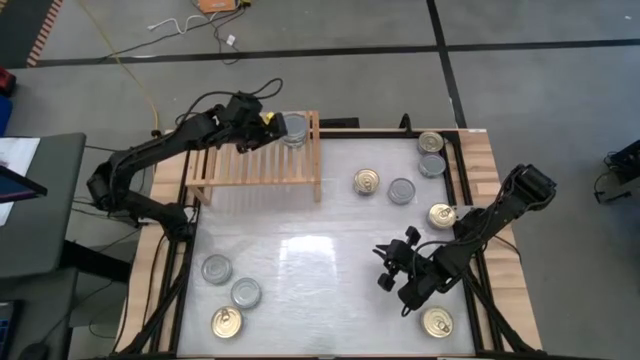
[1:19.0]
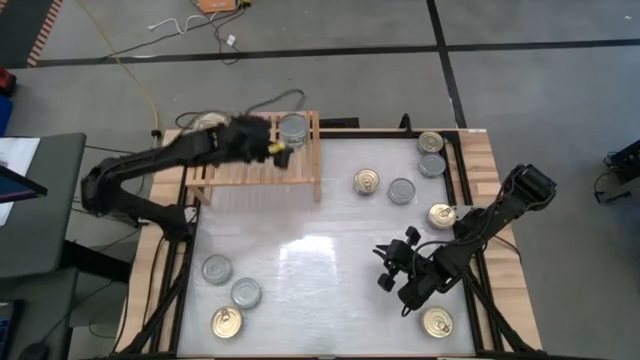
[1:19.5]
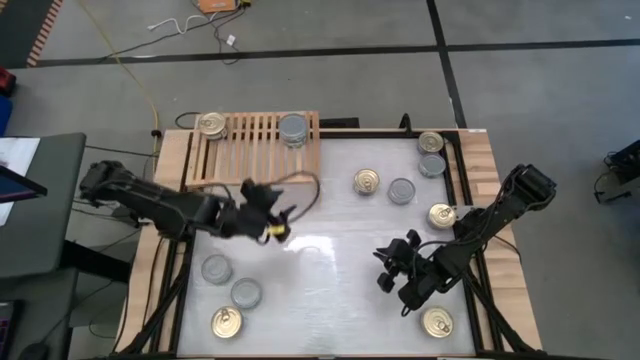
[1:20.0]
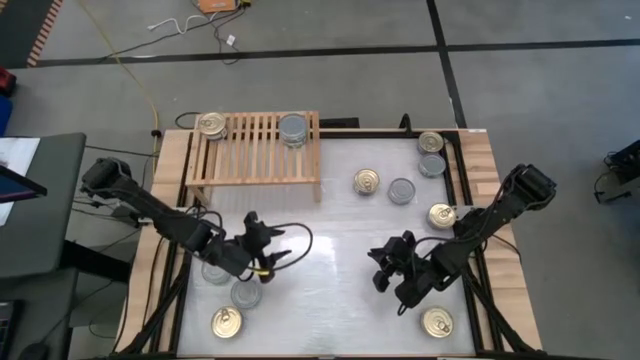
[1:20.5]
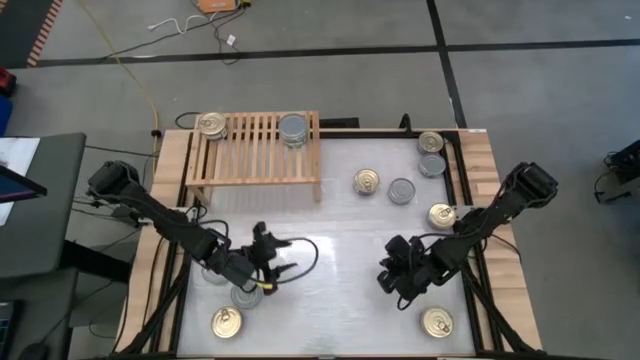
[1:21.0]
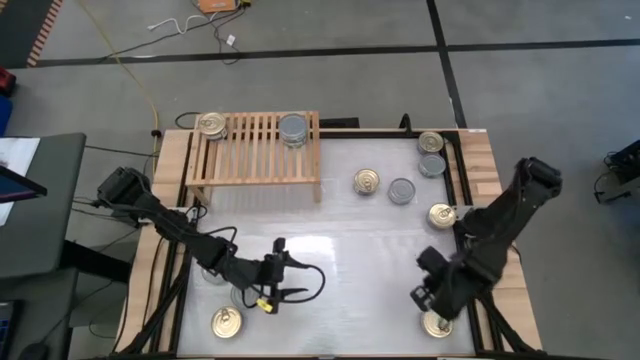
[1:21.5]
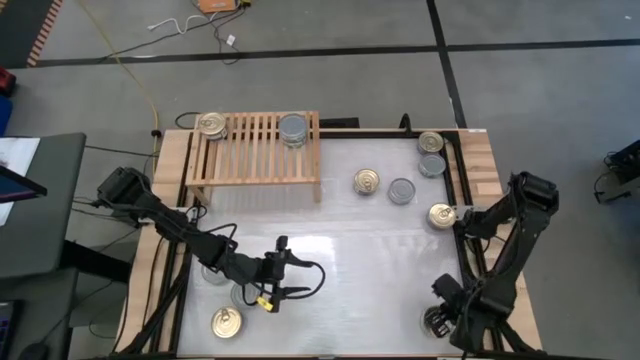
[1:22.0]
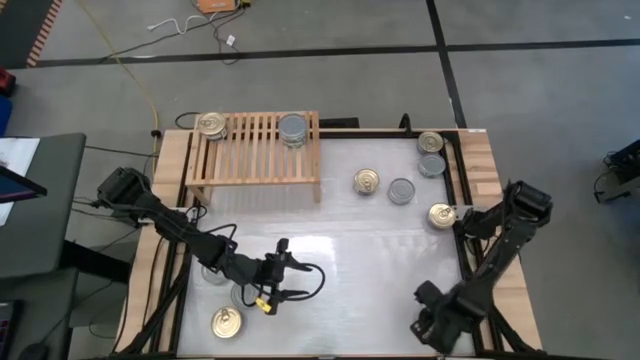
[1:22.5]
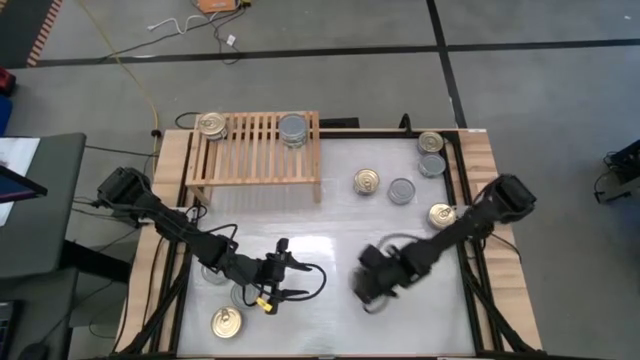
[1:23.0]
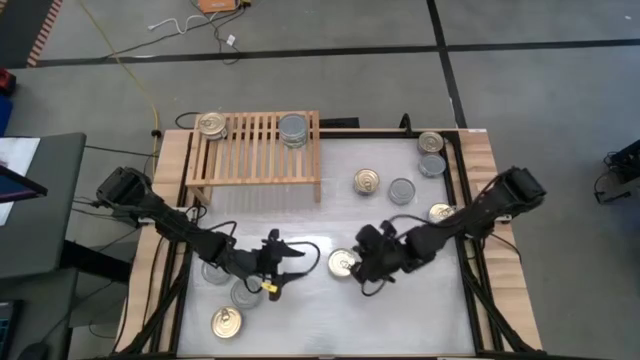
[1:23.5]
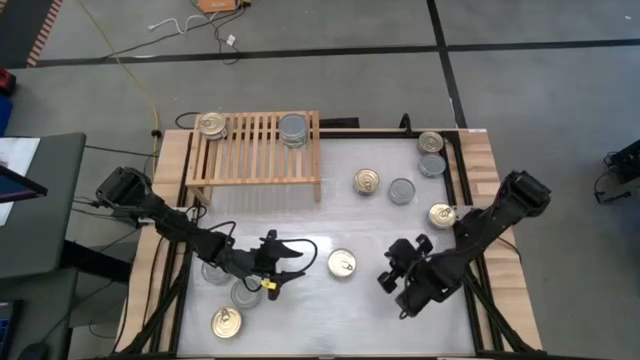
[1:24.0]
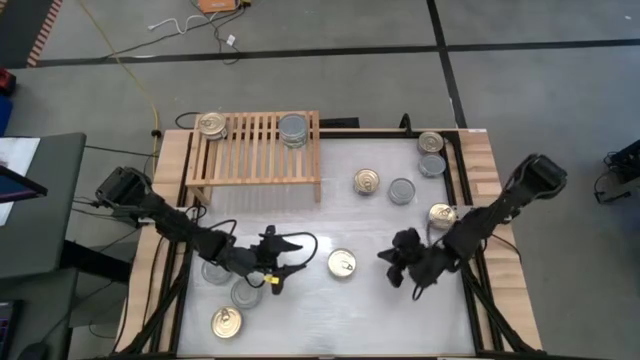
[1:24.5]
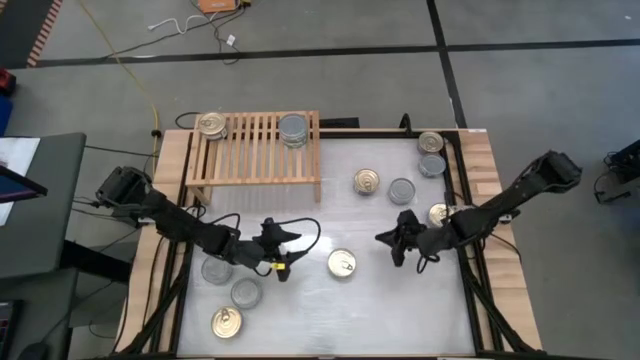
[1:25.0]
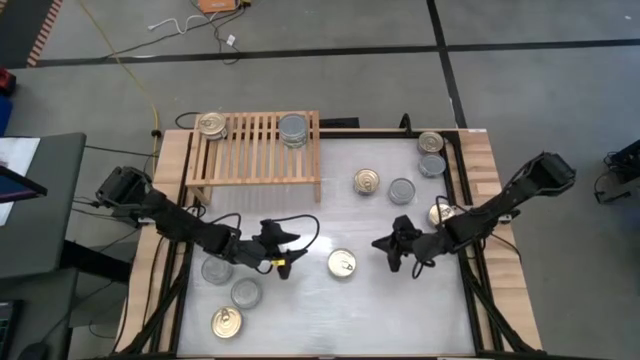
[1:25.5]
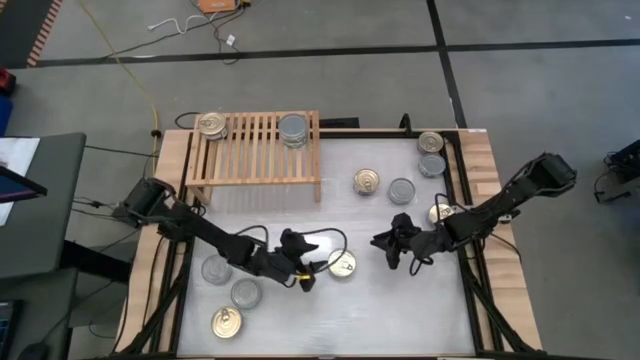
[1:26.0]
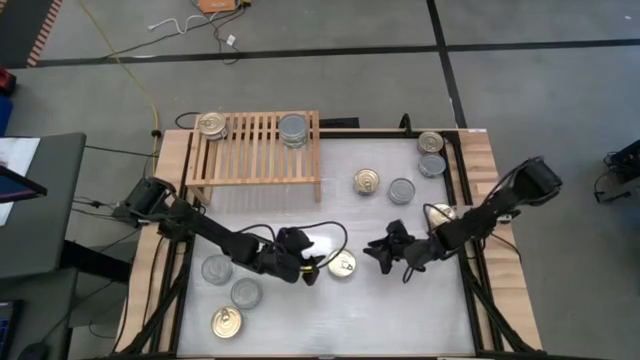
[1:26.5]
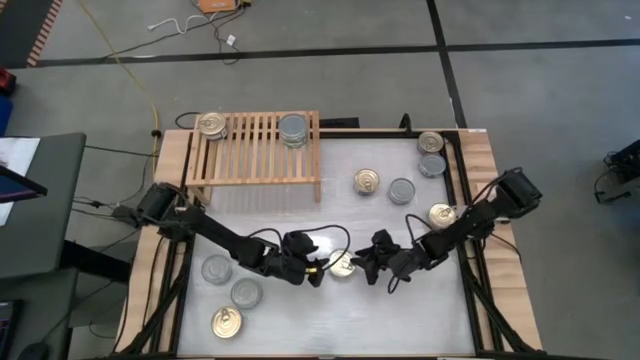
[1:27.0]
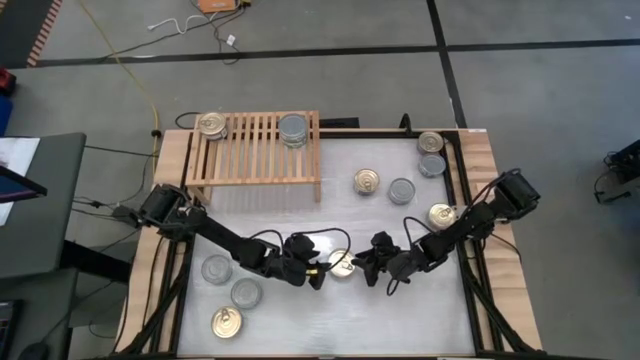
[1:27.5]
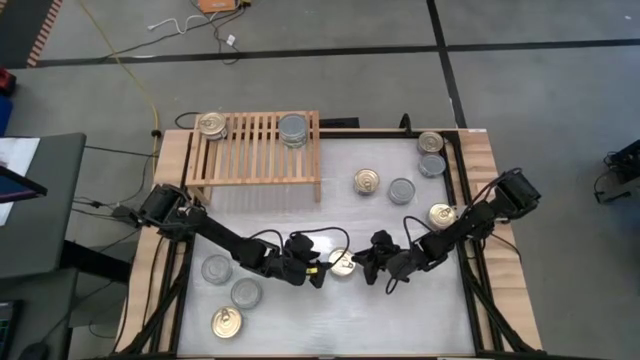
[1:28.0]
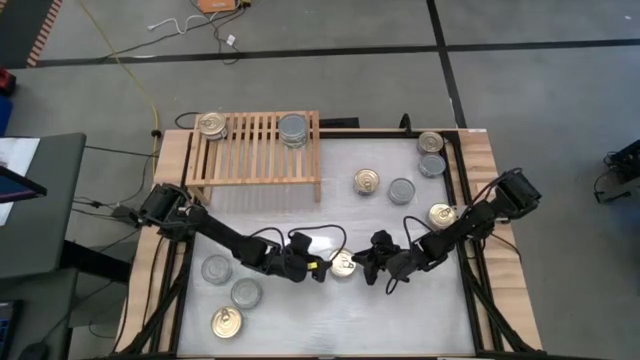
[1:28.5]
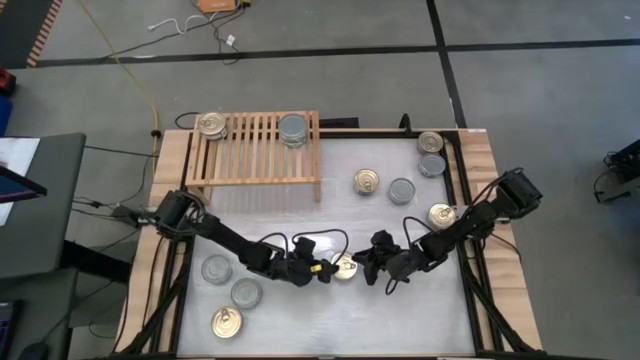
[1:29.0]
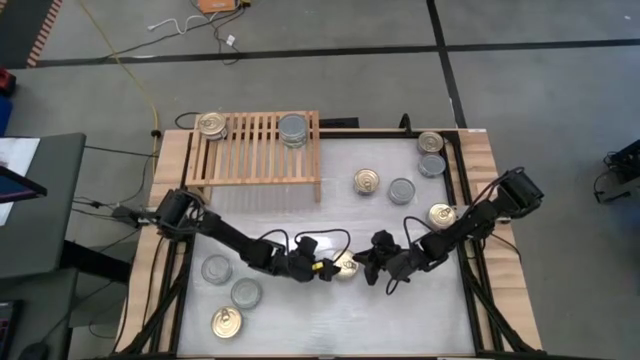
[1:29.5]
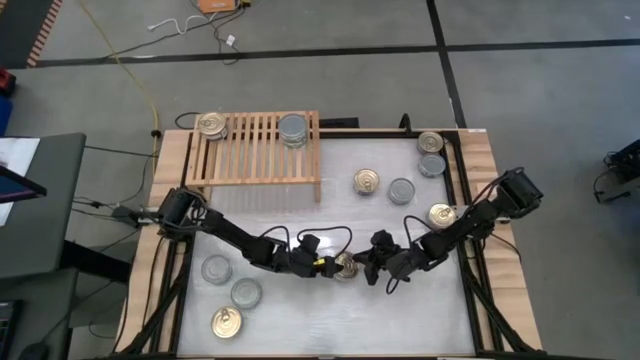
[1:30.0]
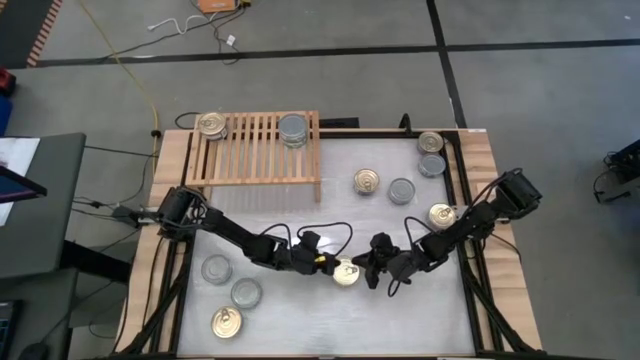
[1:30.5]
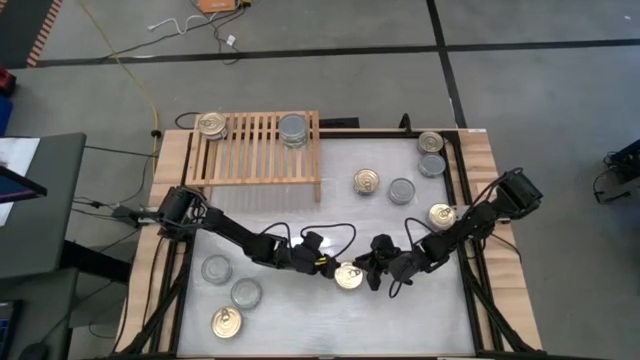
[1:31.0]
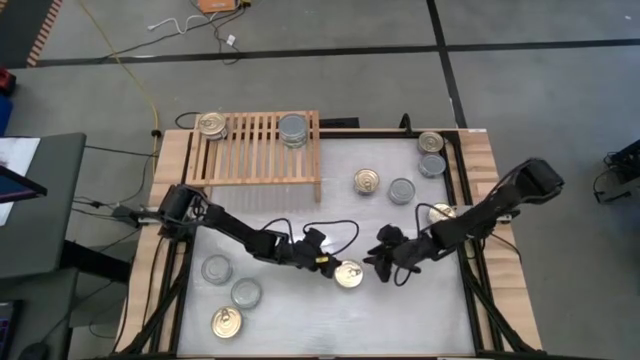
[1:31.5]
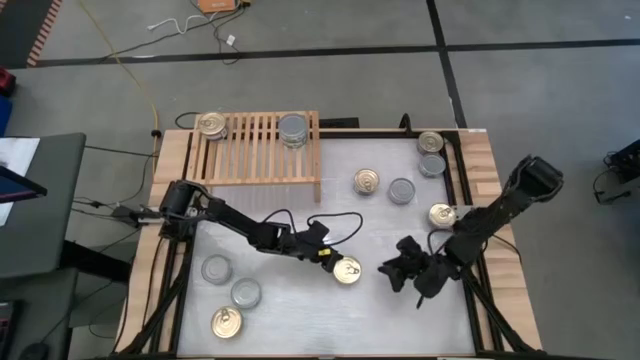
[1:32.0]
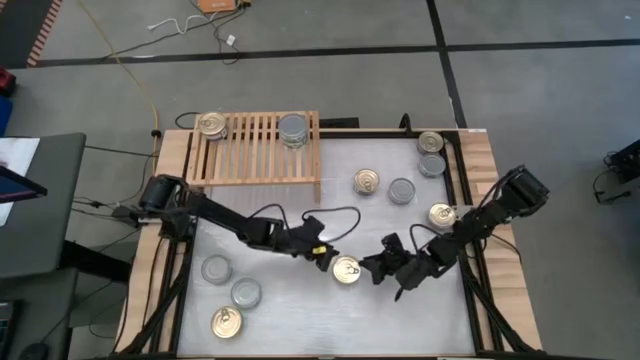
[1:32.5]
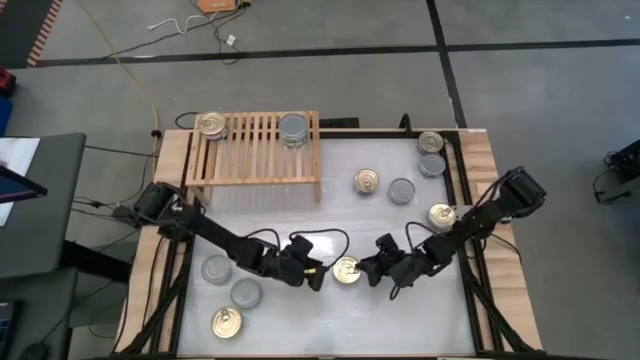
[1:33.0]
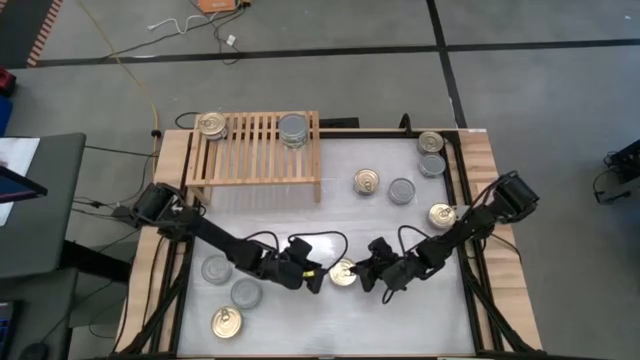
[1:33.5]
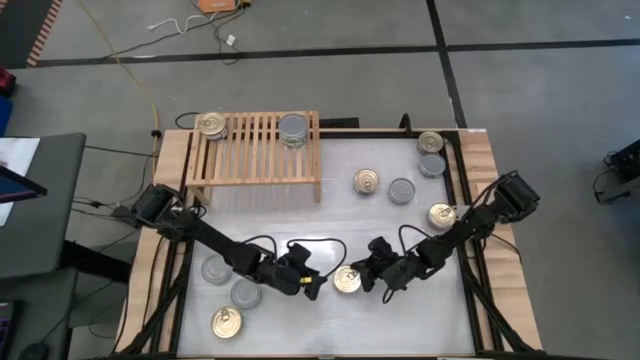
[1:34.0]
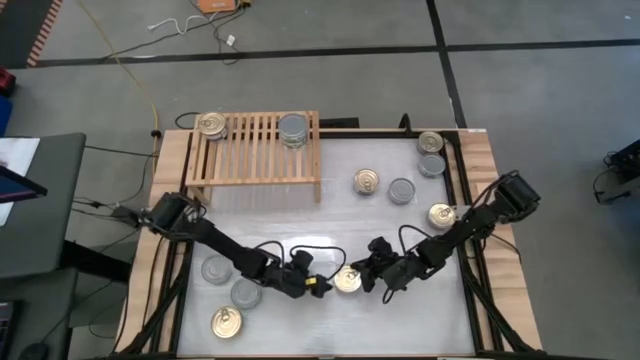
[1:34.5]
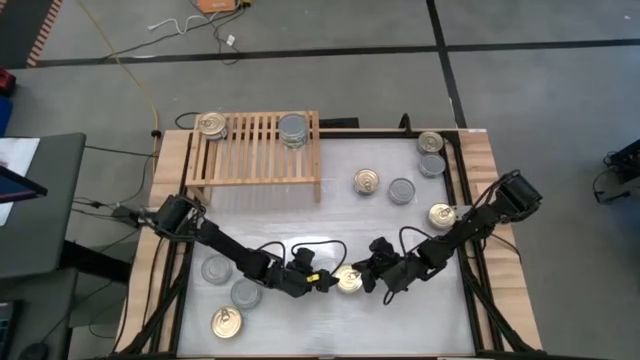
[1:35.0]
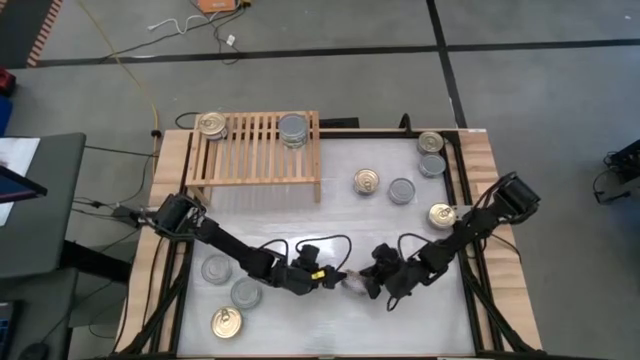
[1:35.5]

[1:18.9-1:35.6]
Task: Stack canned seafood by type on shelf
Stack the blue tuna can on top of the blue tuna can on the shelf

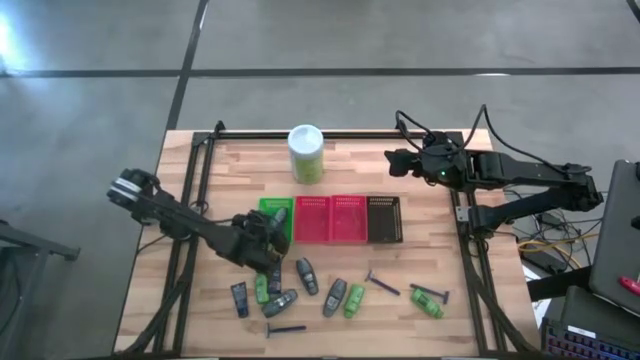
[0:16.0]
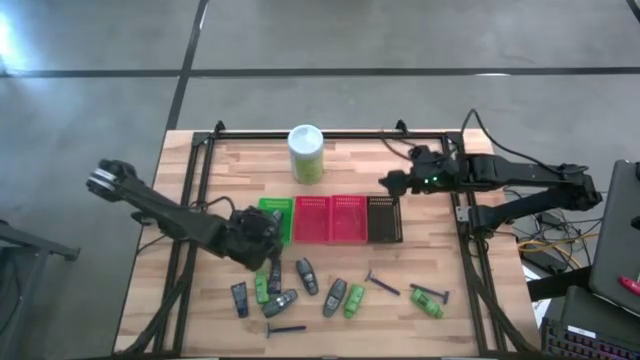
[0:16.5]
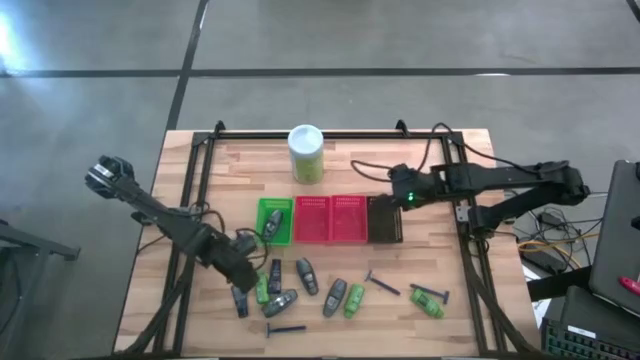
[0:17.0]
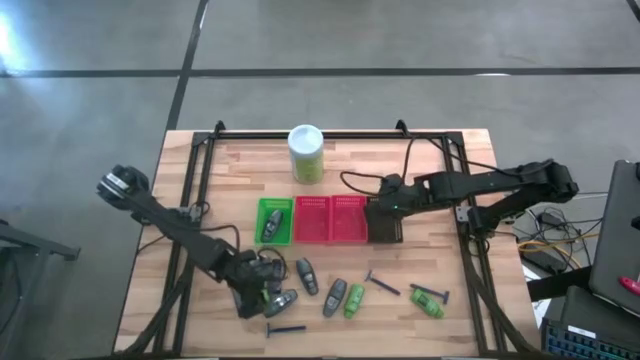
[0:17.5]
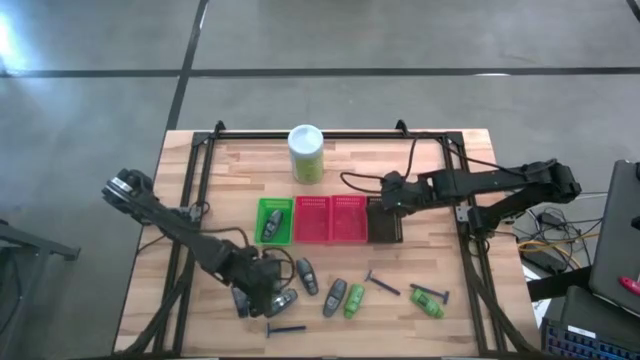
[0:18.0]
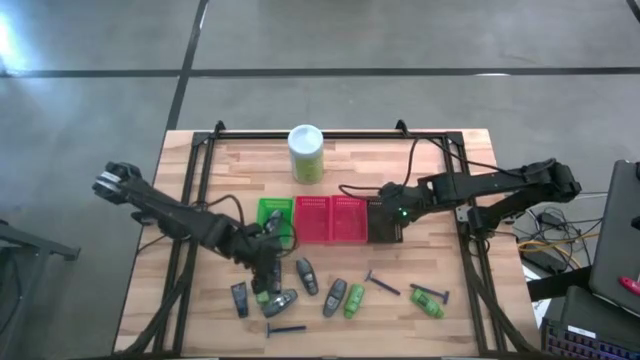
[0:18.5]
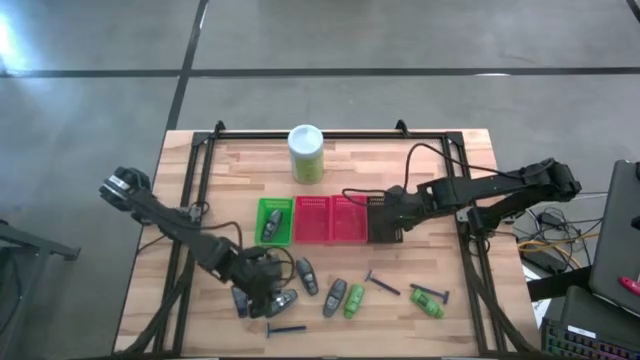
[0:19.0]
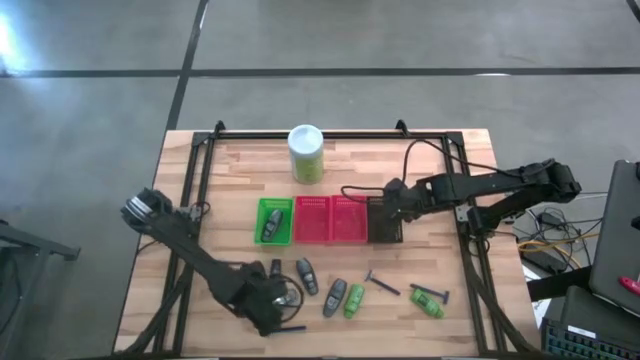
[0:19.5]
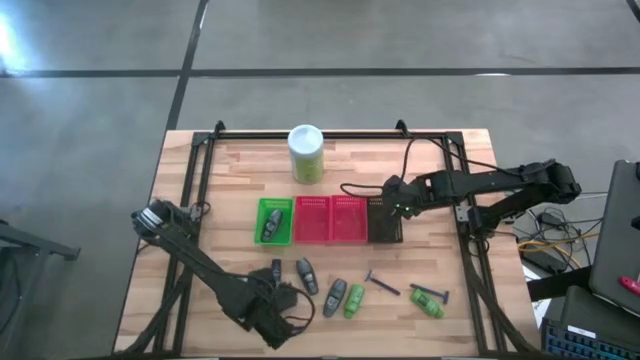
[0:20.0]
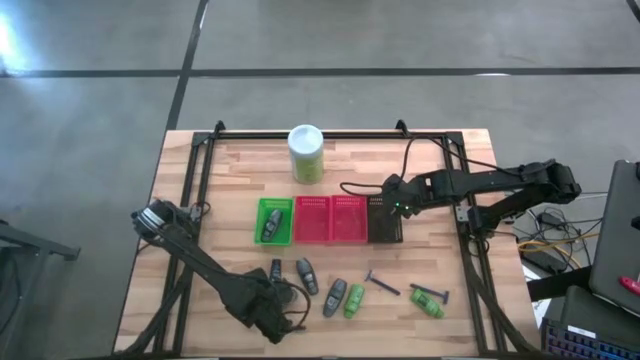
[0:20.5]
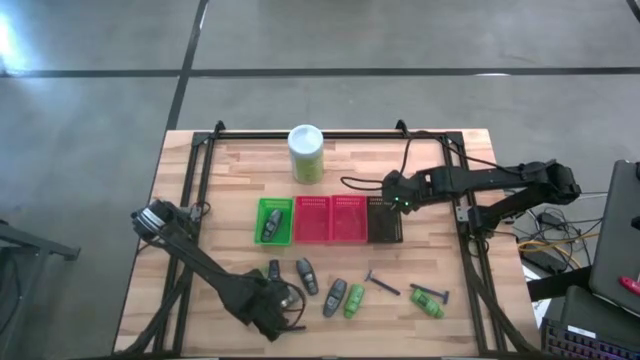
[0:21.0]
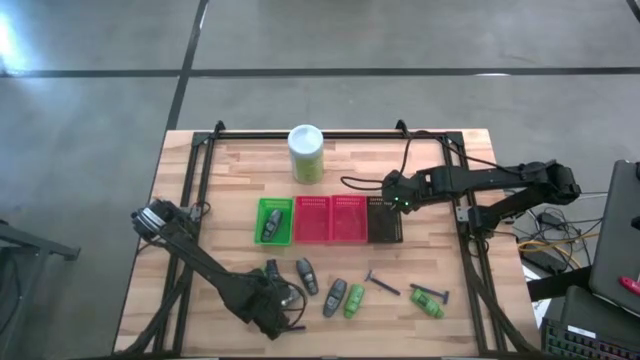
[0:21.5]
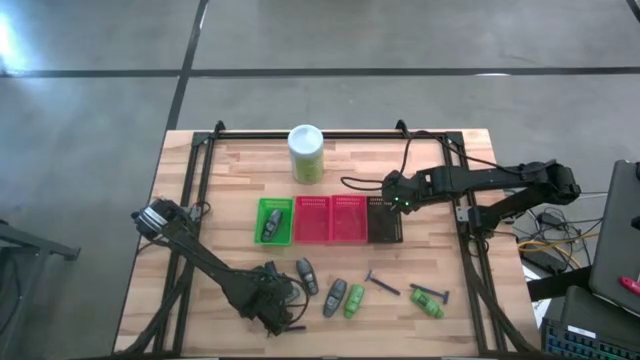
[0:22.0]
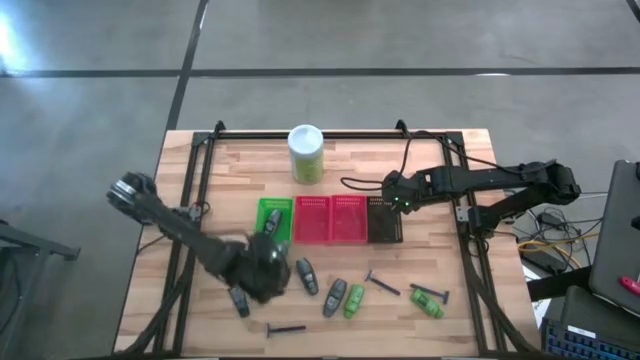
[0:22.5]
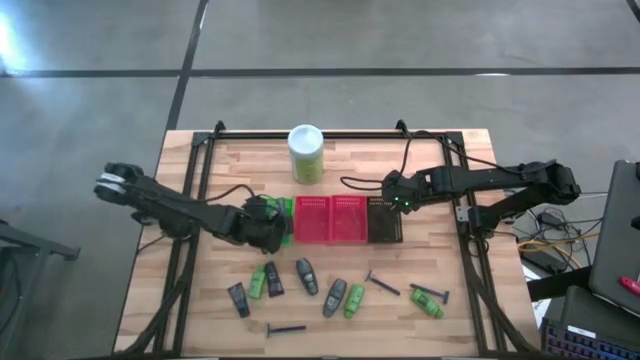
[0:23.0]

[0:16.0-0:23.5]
Task: Pick & Place Travel size toiletries
Put the gray deodorant into the green bin
